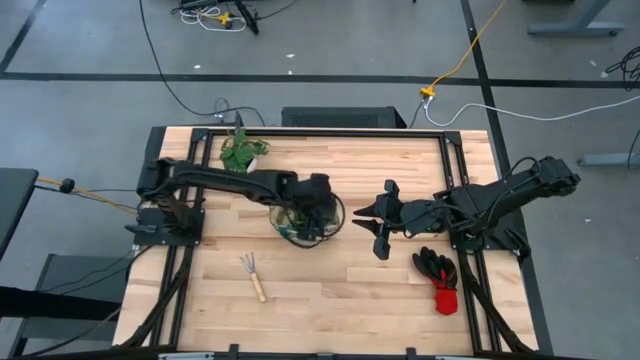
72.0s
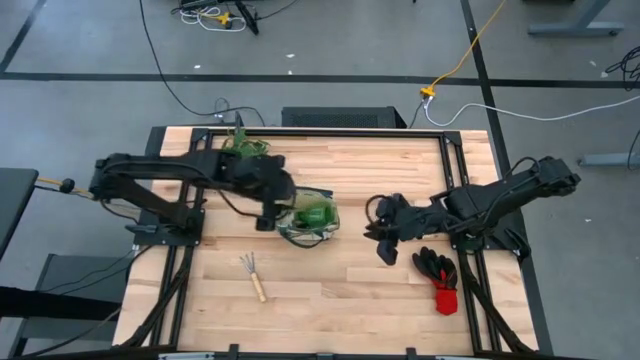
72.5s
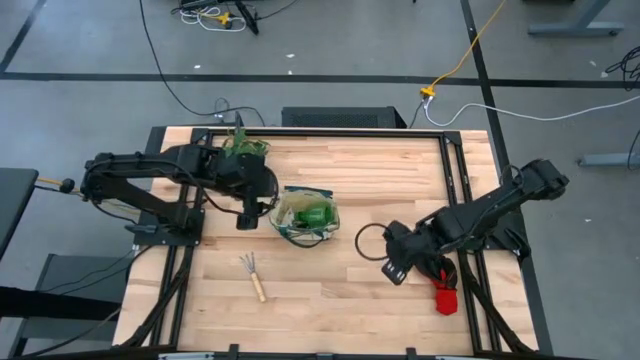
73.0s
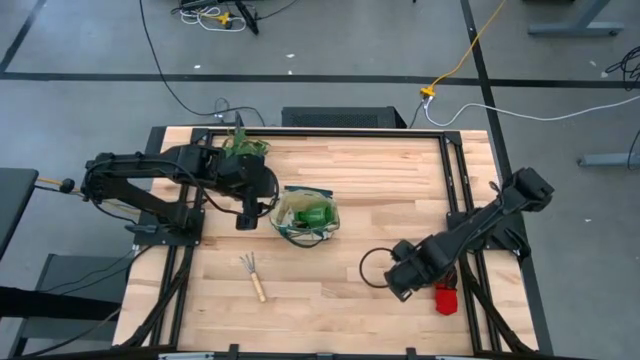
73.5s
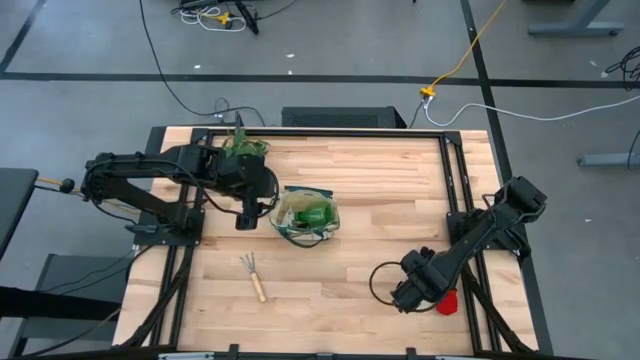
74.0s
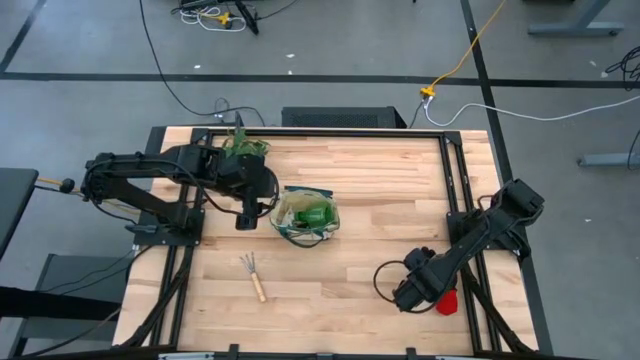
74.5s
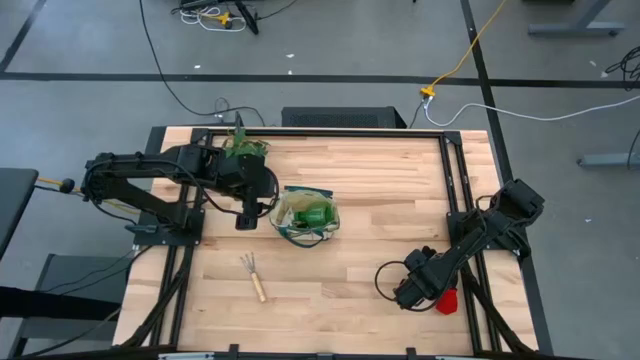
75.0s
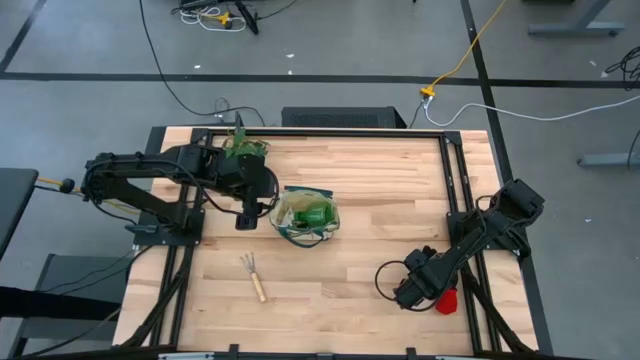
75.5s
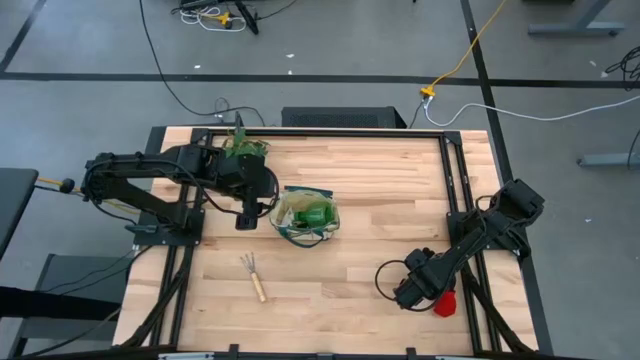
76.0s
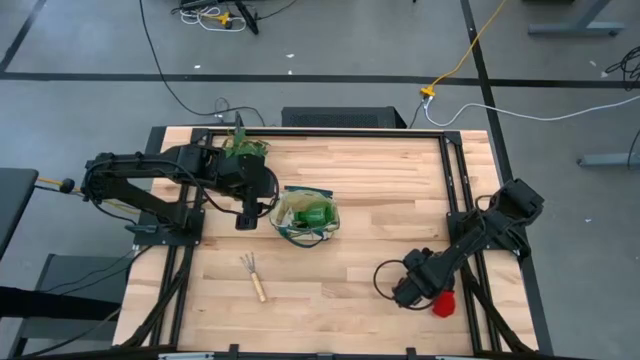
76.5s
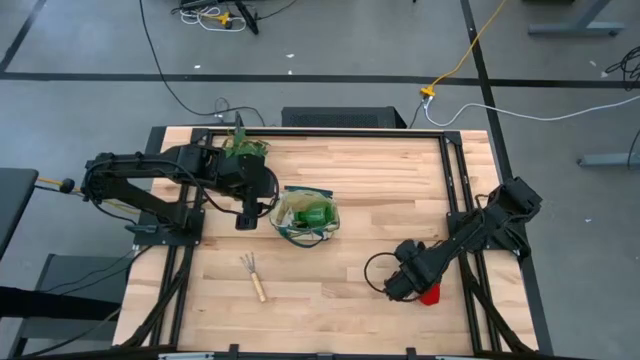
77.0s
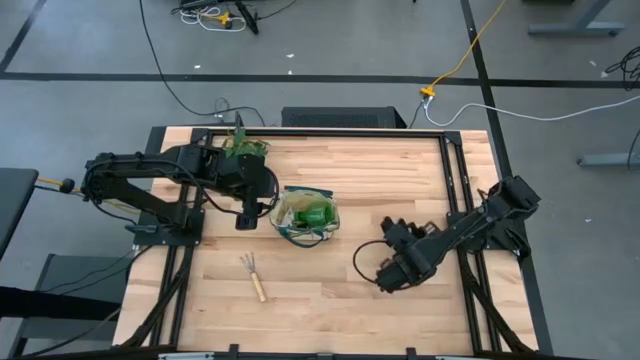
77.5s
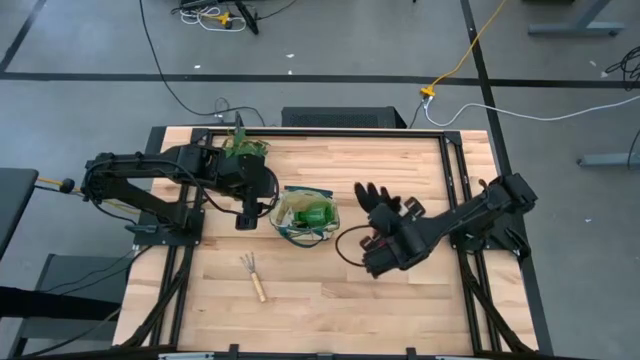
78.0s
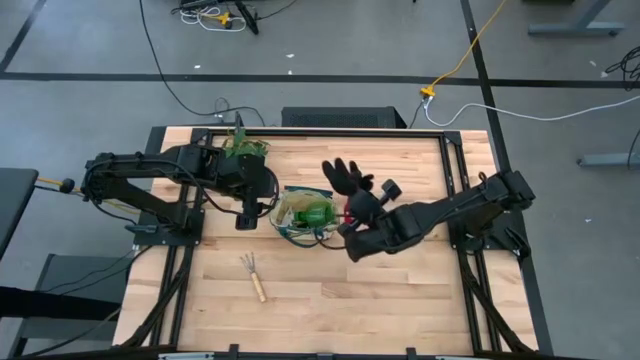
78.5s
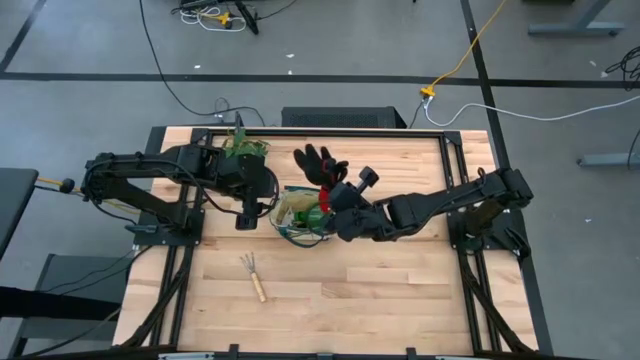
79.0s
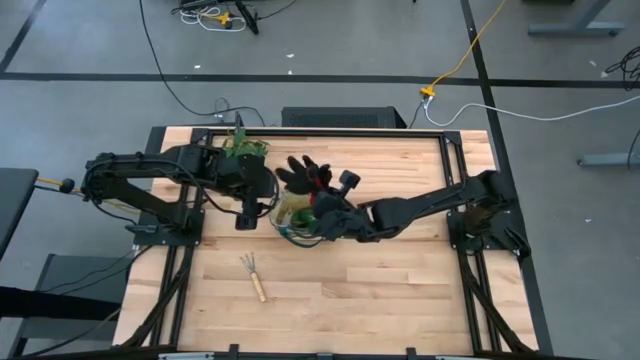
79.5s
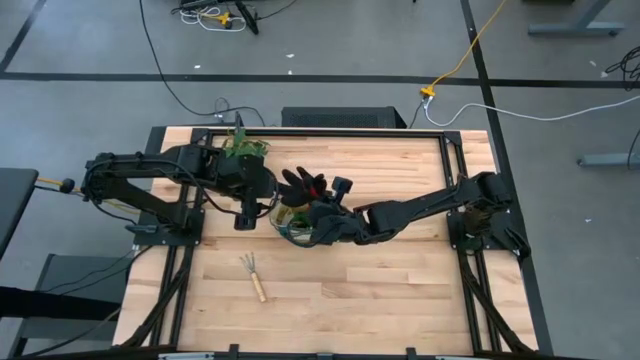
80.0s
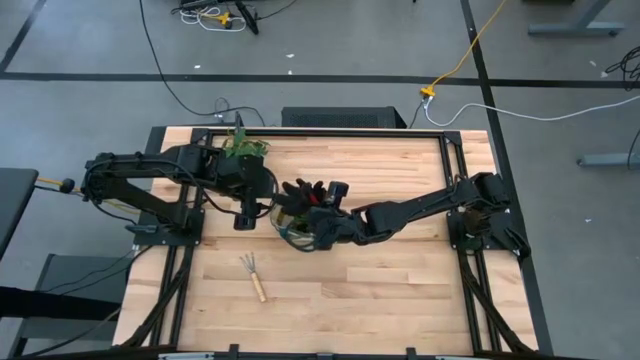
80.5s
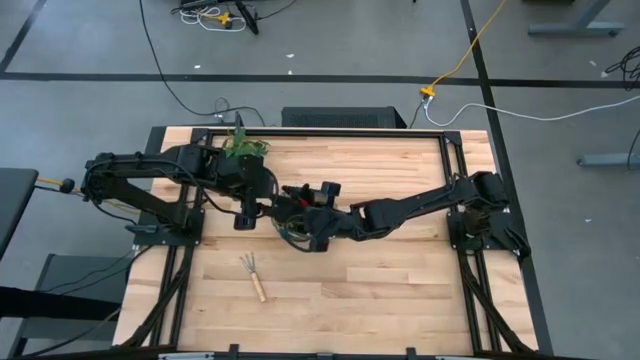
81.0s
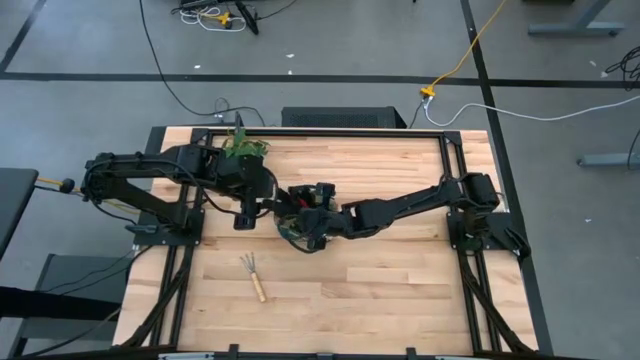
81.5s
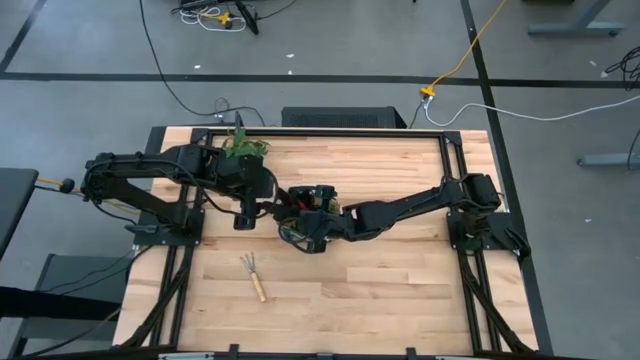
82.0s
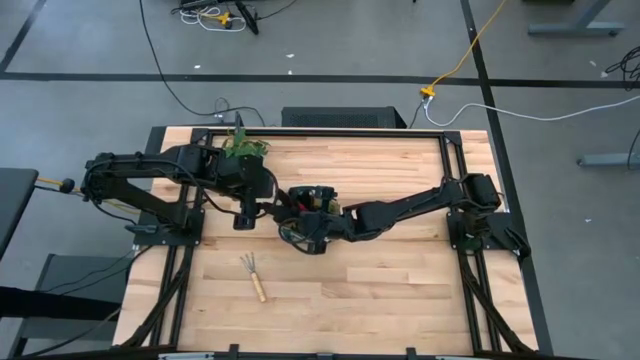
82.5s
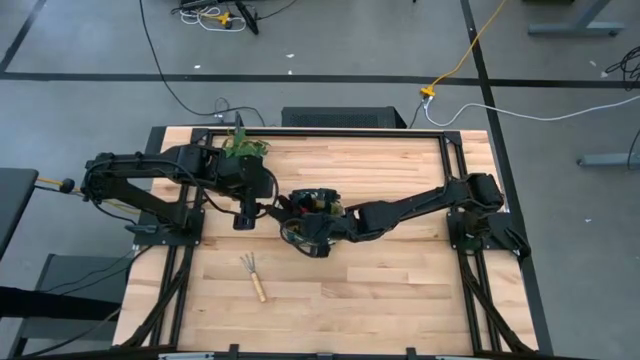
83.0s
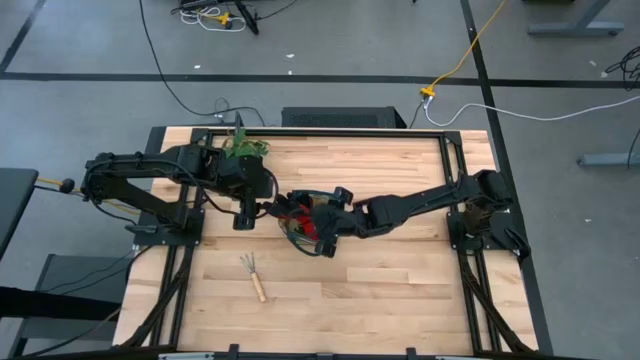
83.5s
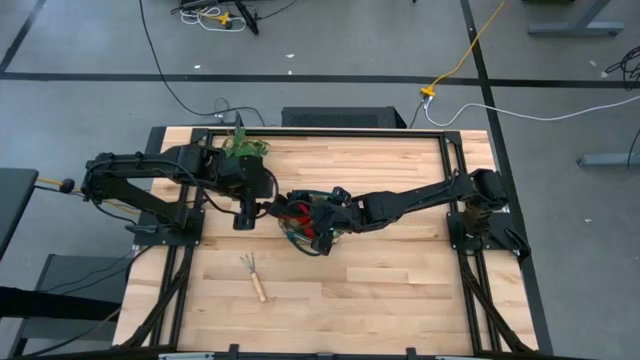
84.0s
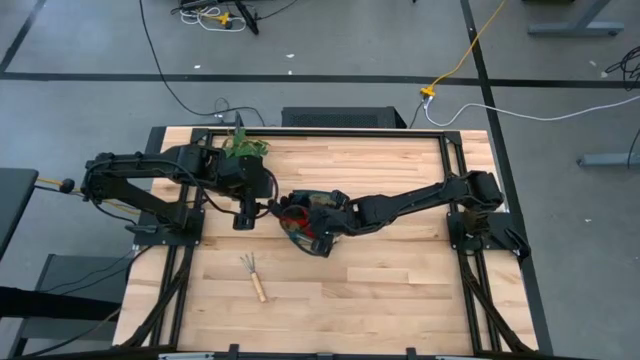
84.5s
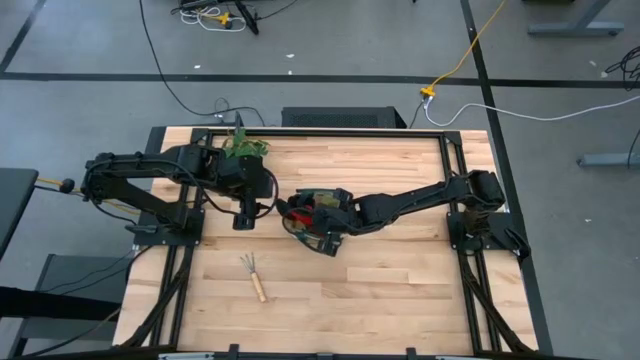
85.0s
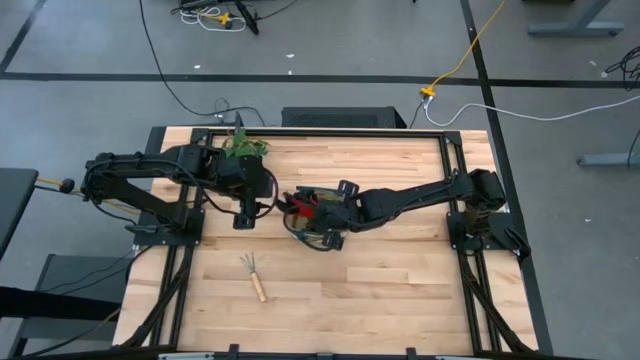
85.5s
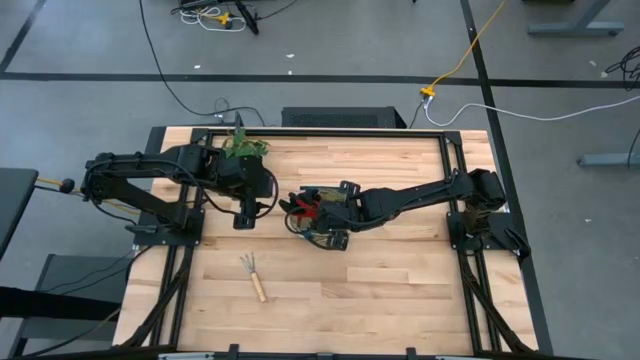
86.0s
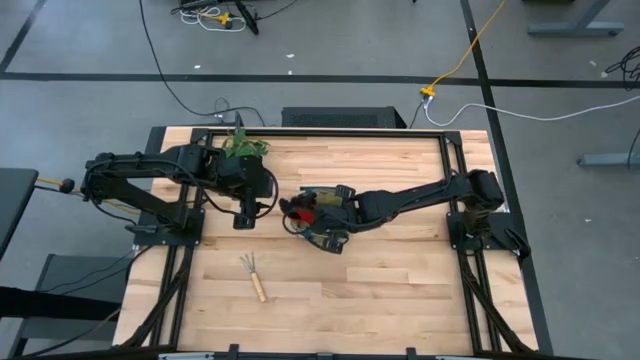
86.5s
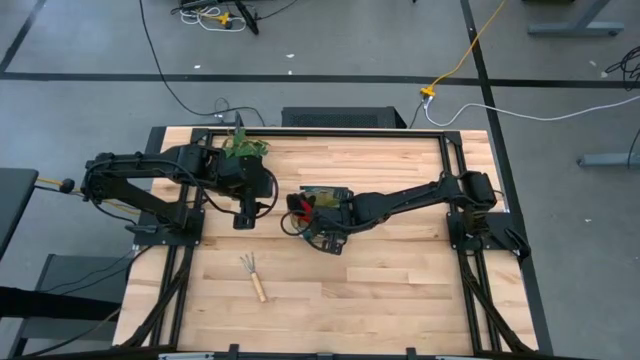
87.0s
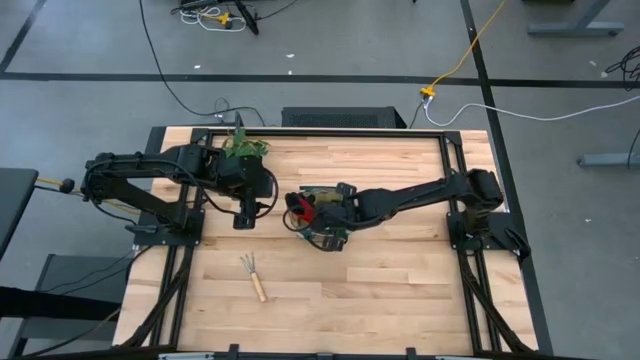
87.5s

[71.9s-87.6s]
Task: Pick & Place Garden tools in Gardening bag
Put the red gloves into the white gardening bag

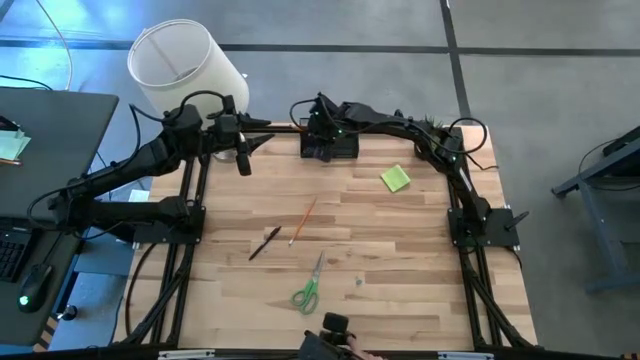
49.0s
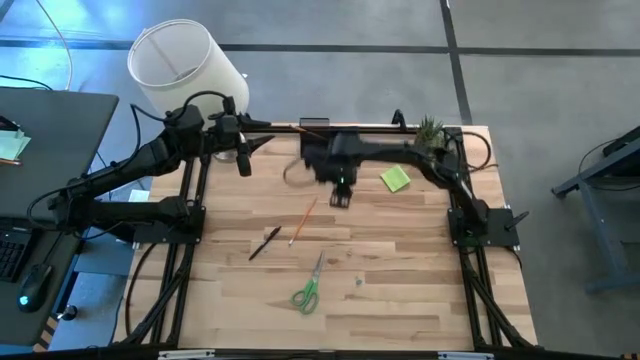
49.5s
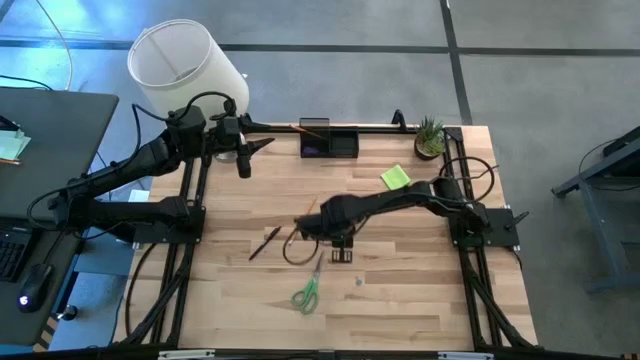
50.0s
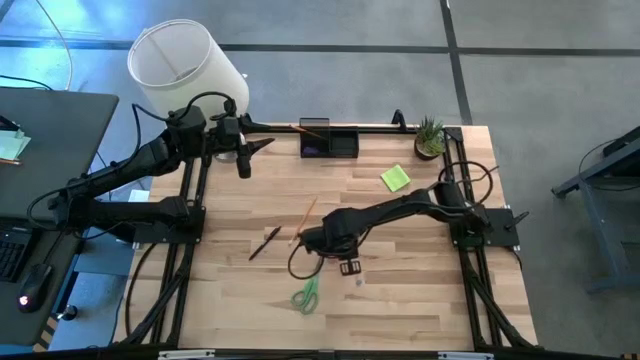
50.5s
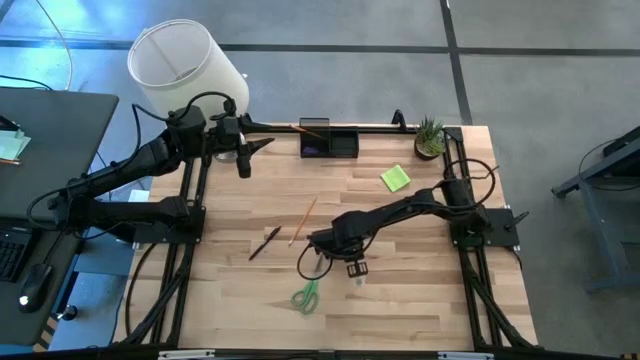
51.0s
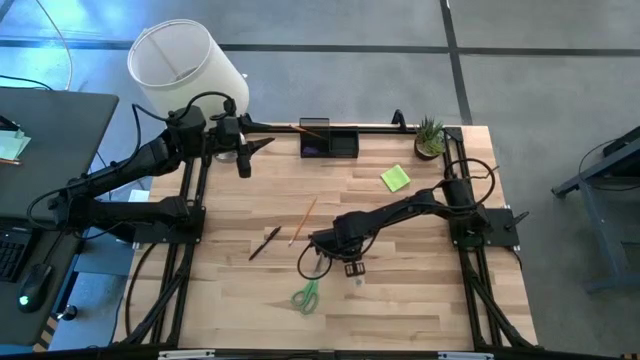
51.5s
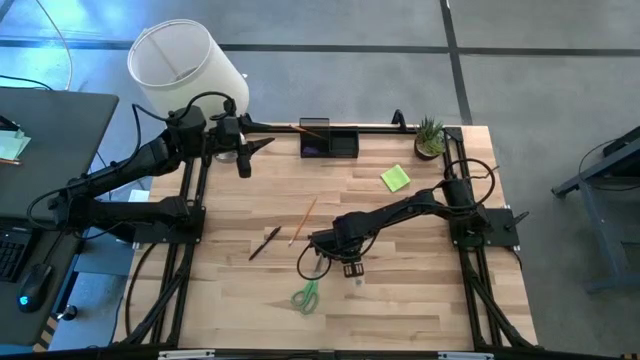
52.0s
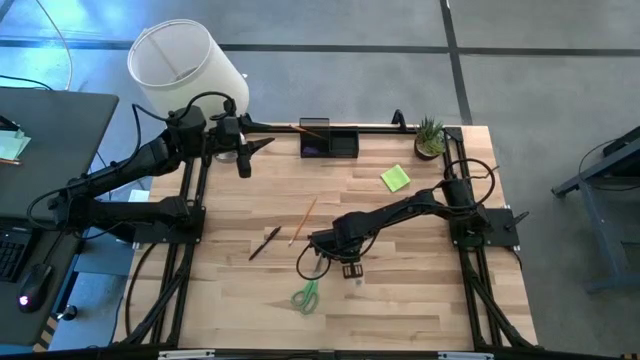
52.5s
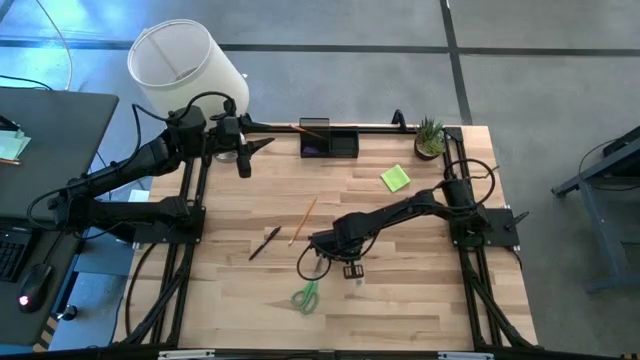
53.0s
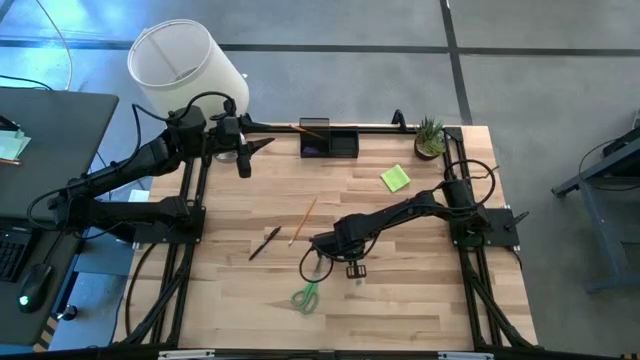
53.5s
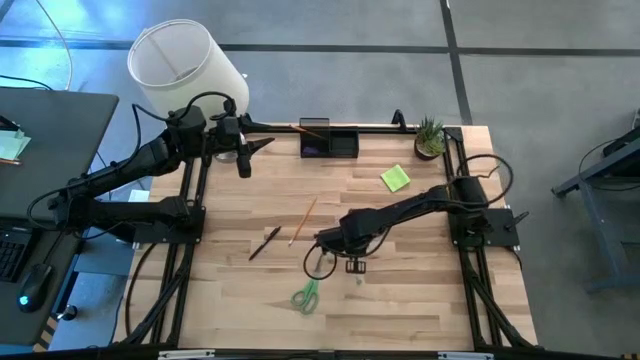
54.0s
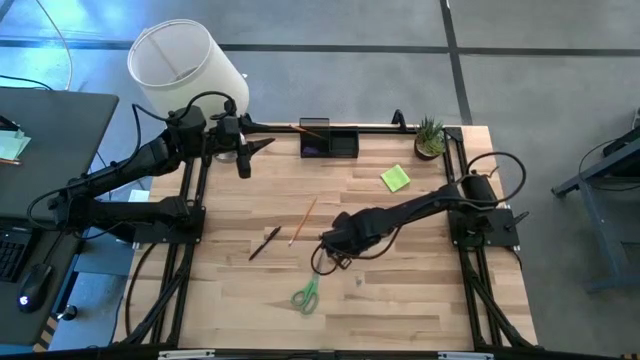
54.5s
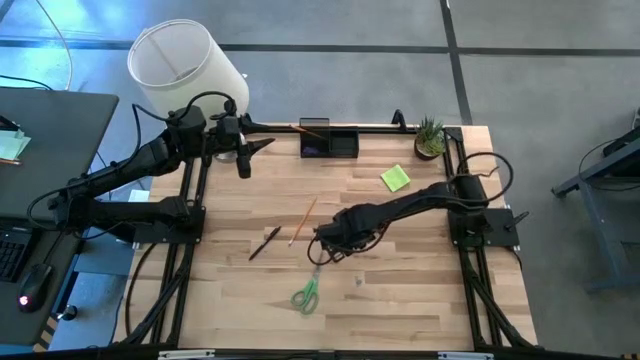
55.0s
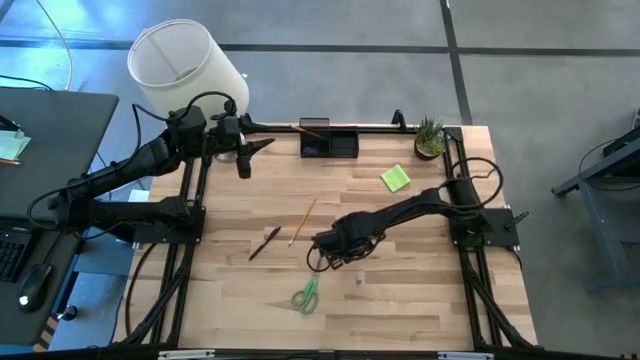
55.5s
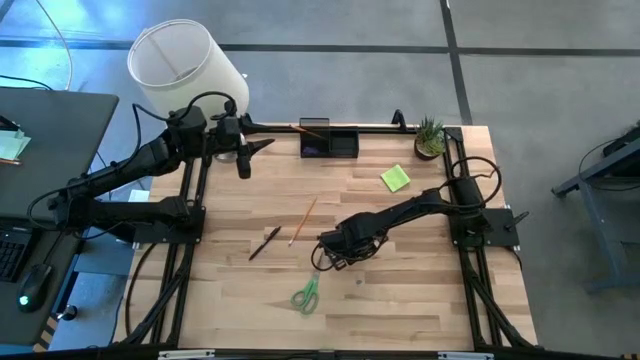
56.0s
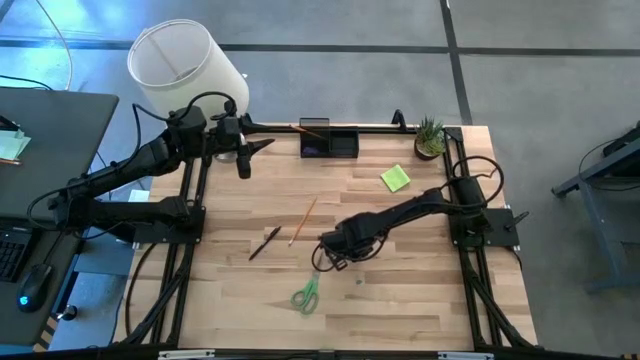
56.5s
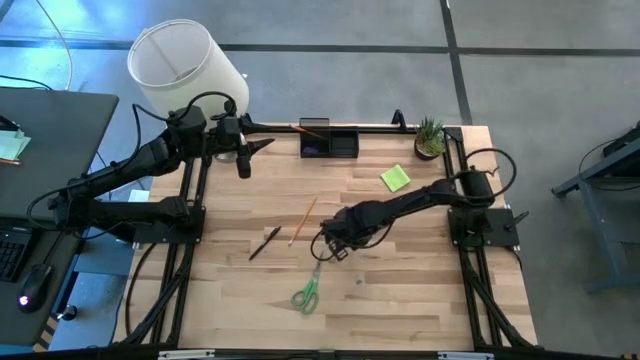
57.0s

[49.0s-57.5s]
Task: Pick and place office supplies into organizer
Put the pink binder clip into the black desk organizer
